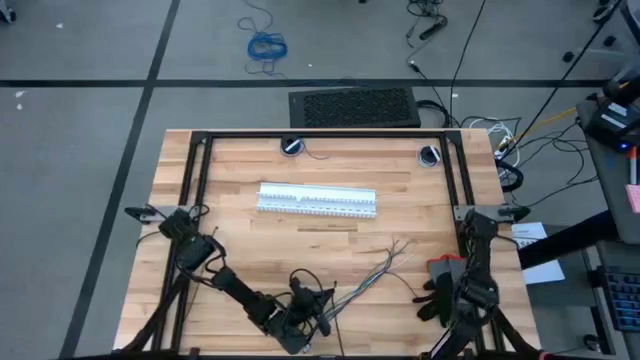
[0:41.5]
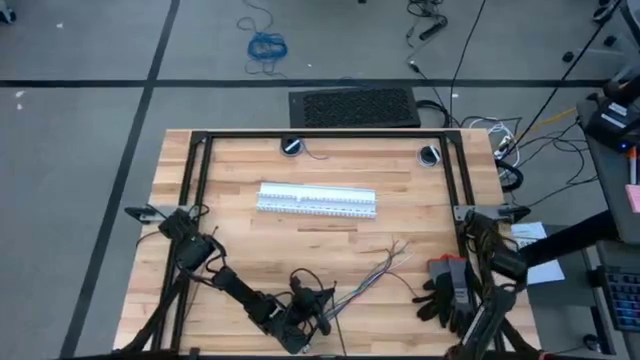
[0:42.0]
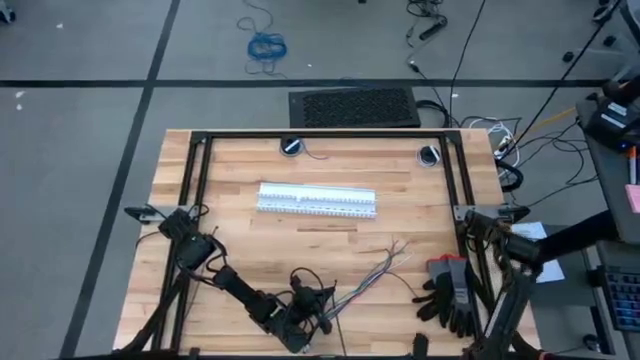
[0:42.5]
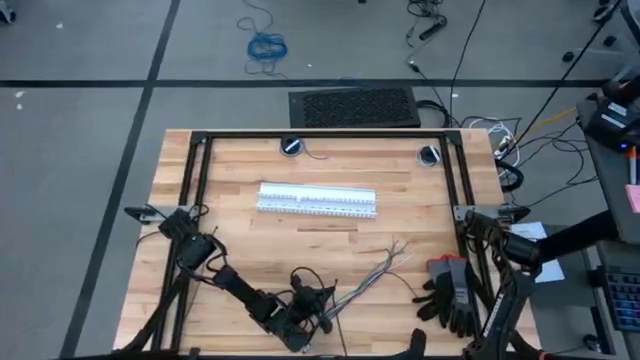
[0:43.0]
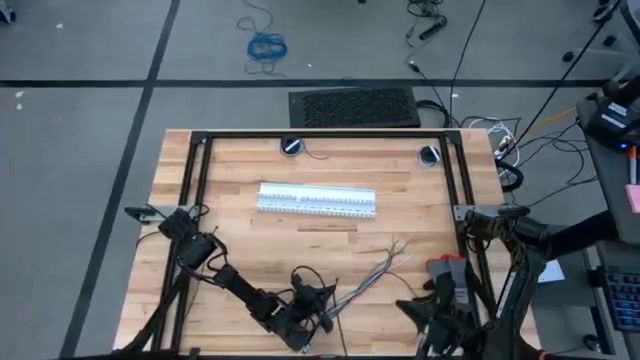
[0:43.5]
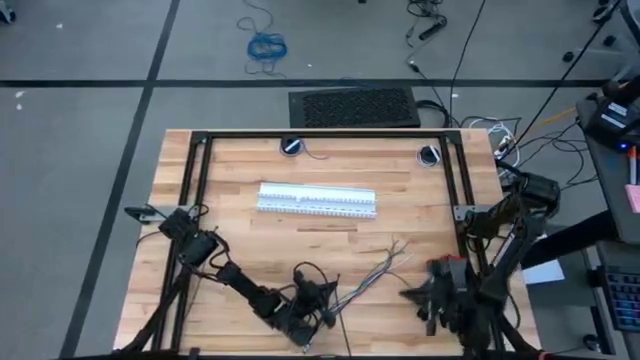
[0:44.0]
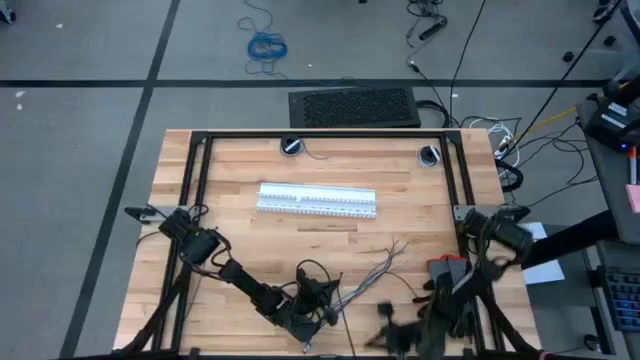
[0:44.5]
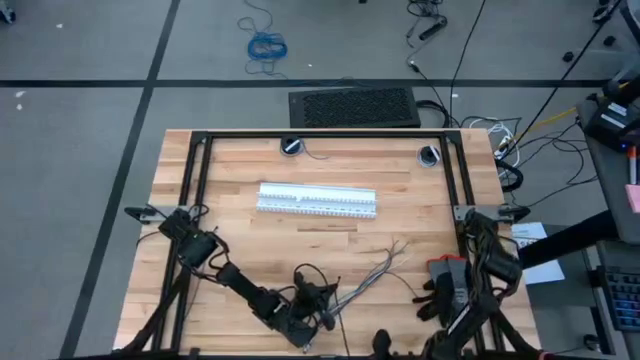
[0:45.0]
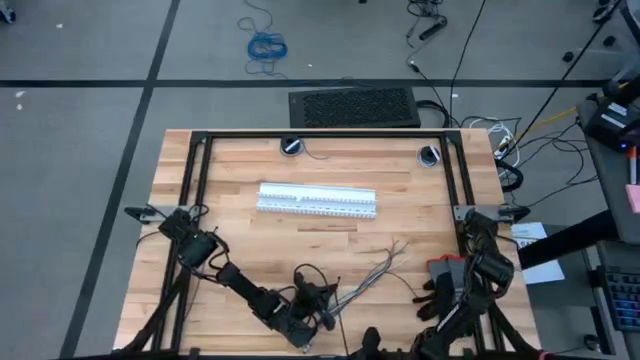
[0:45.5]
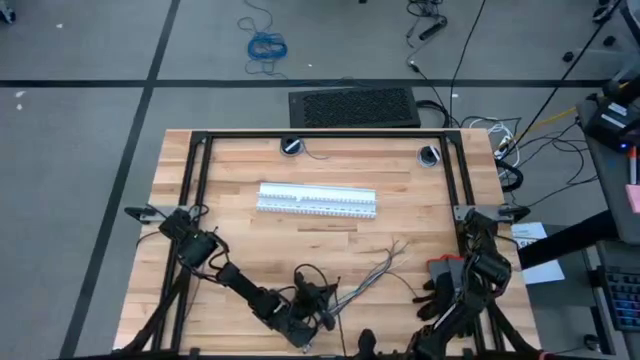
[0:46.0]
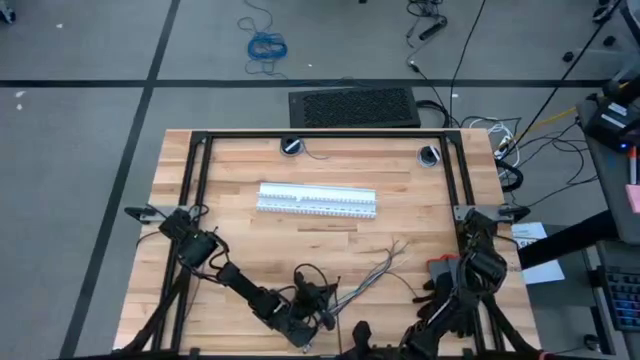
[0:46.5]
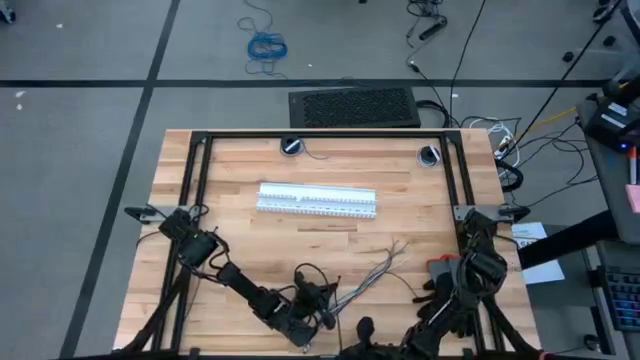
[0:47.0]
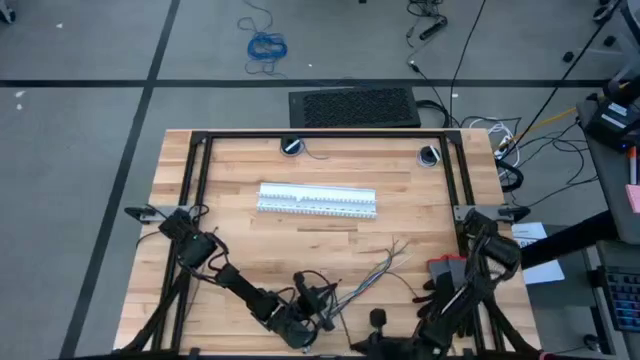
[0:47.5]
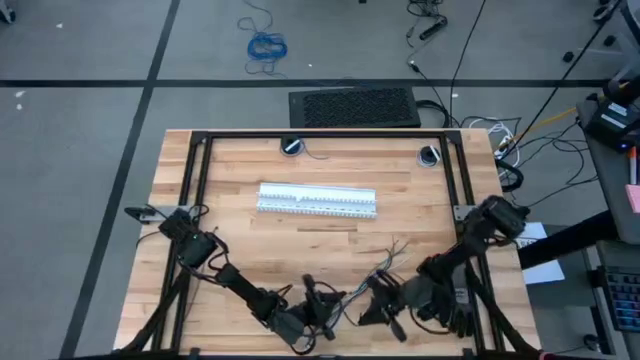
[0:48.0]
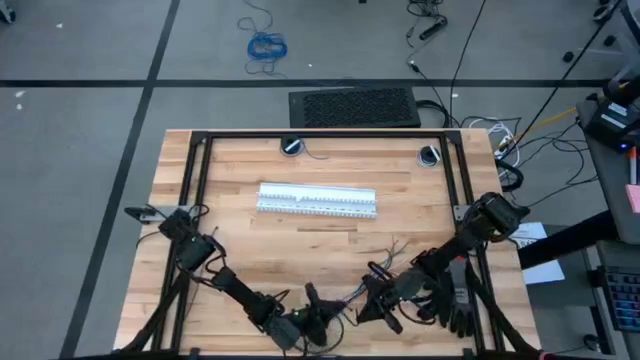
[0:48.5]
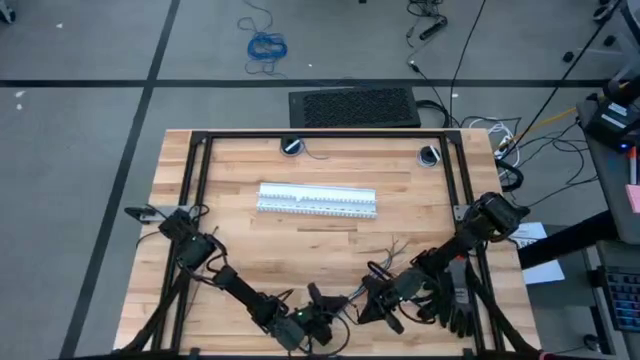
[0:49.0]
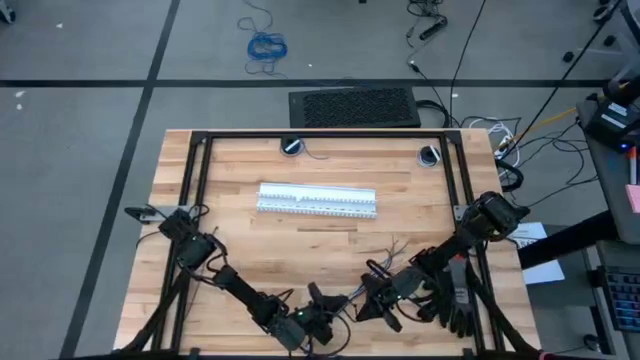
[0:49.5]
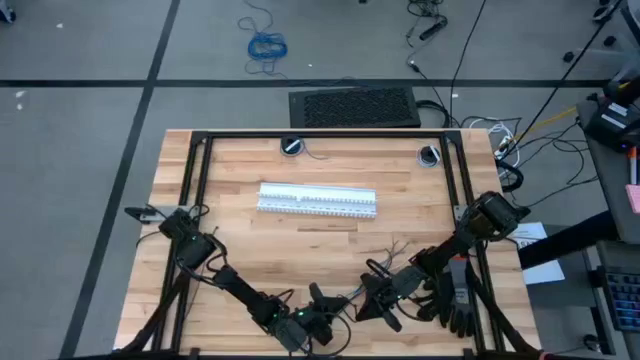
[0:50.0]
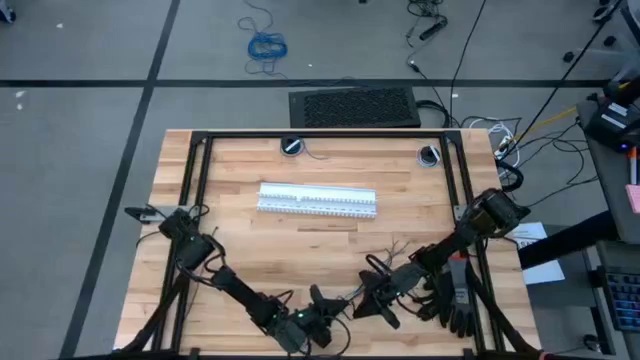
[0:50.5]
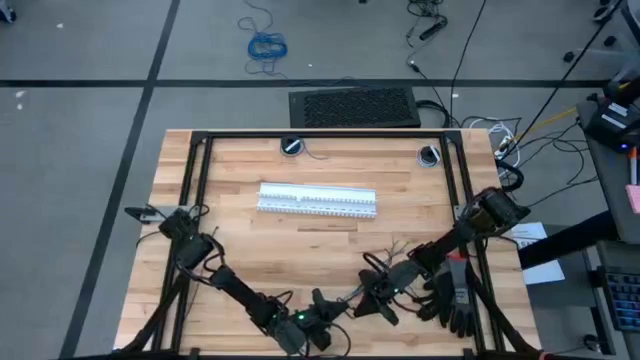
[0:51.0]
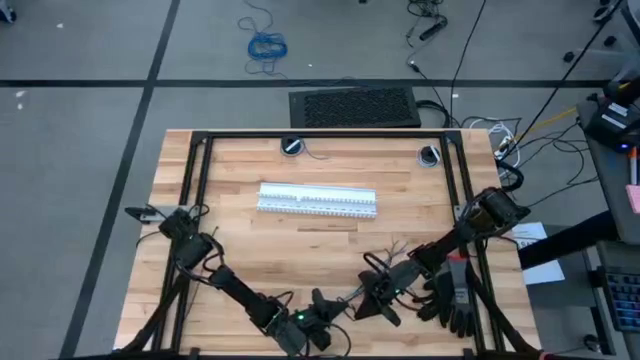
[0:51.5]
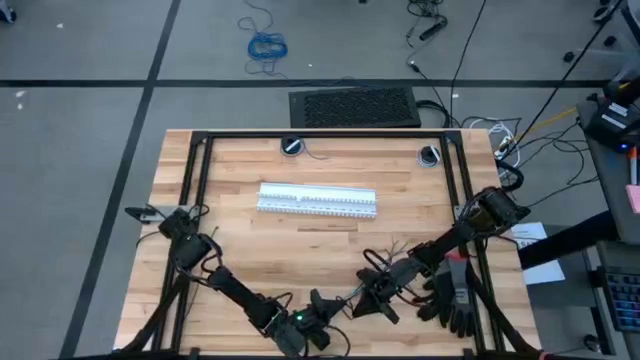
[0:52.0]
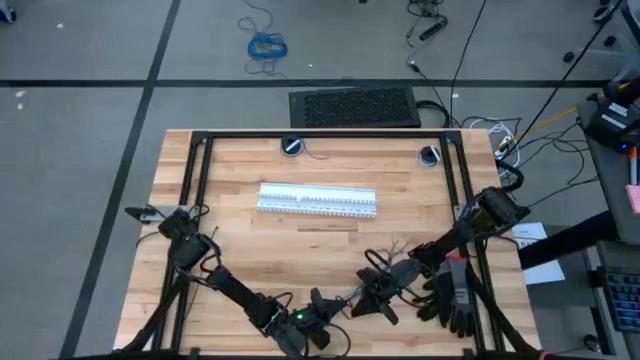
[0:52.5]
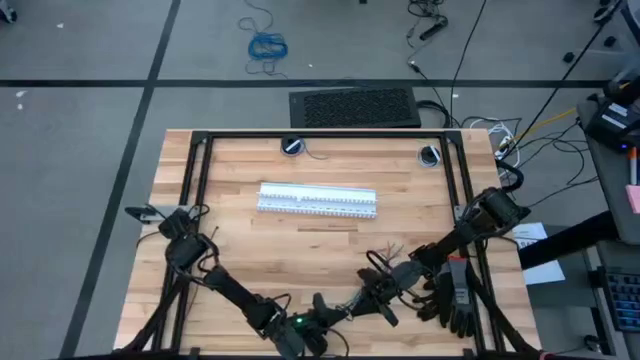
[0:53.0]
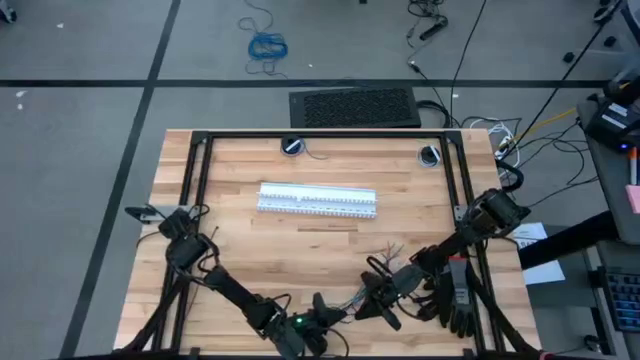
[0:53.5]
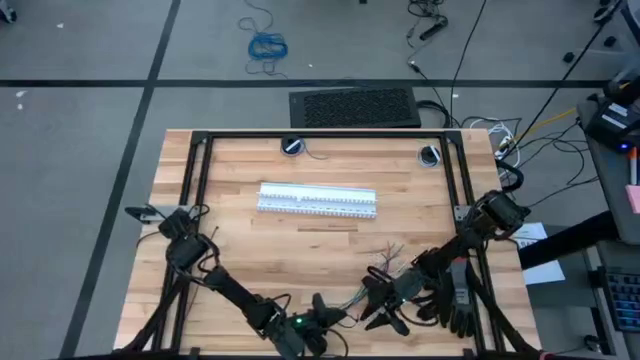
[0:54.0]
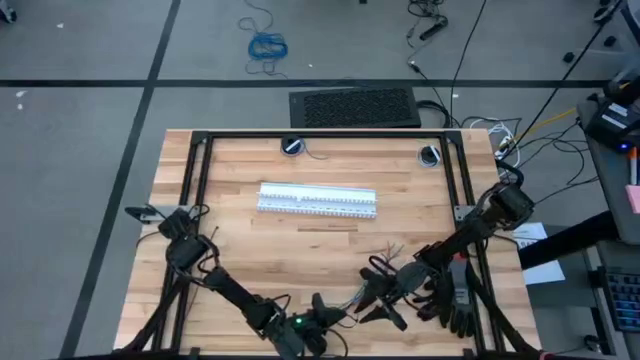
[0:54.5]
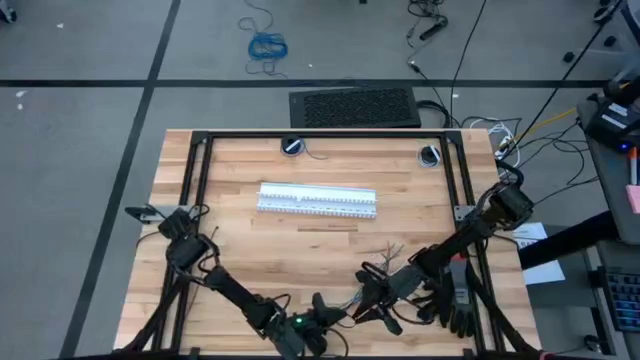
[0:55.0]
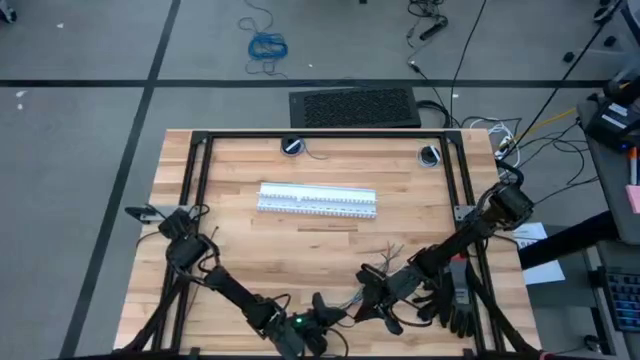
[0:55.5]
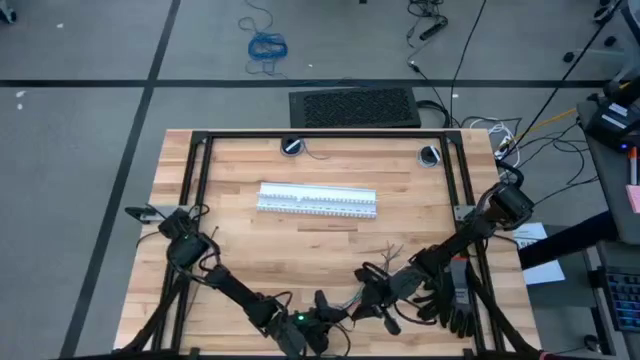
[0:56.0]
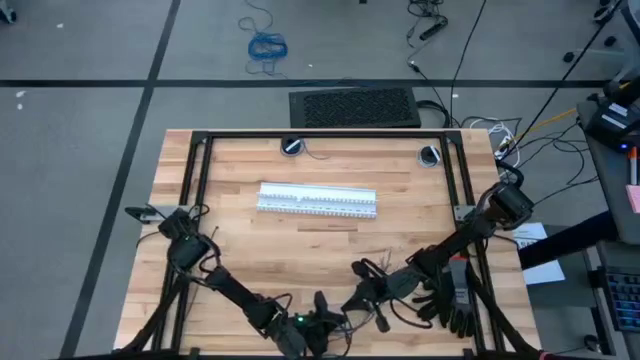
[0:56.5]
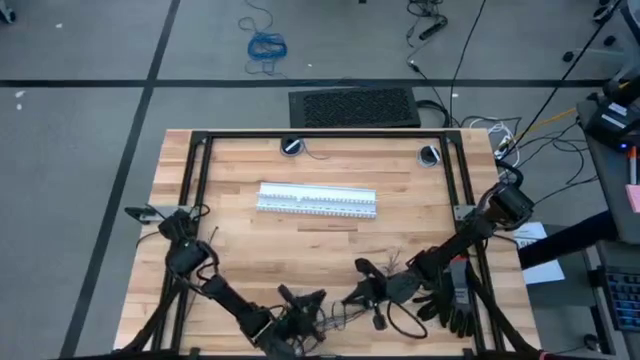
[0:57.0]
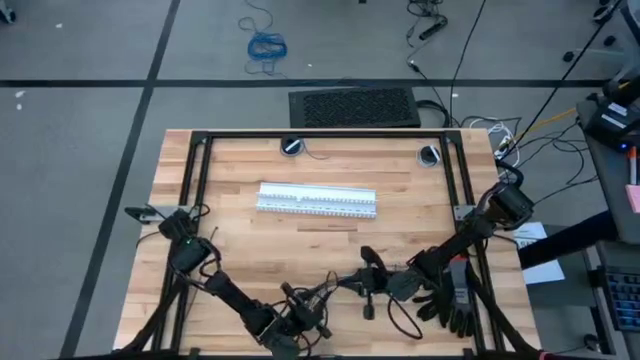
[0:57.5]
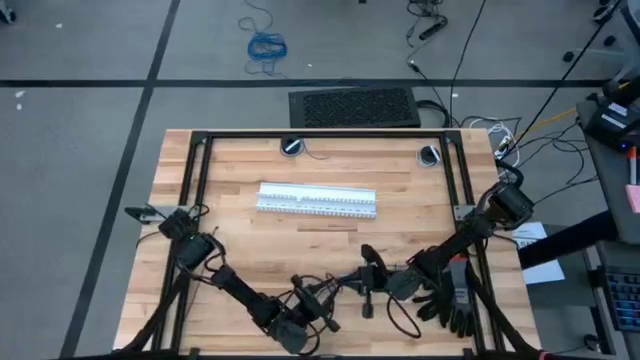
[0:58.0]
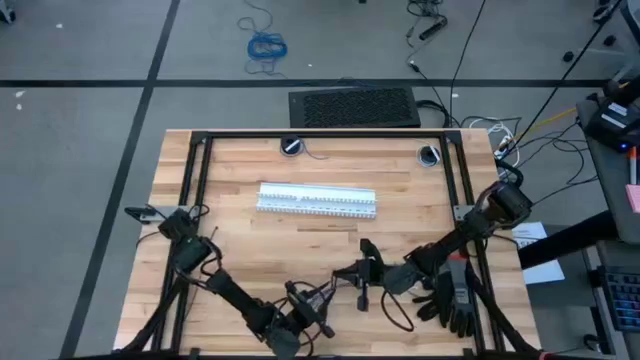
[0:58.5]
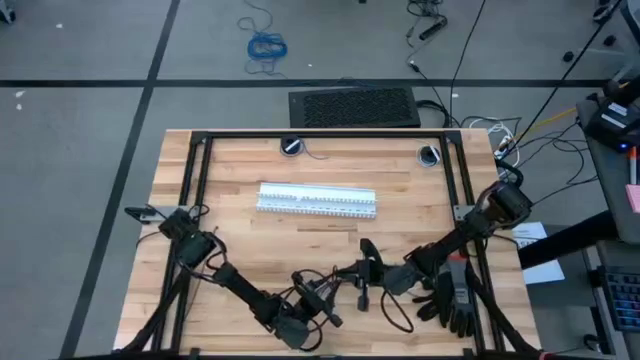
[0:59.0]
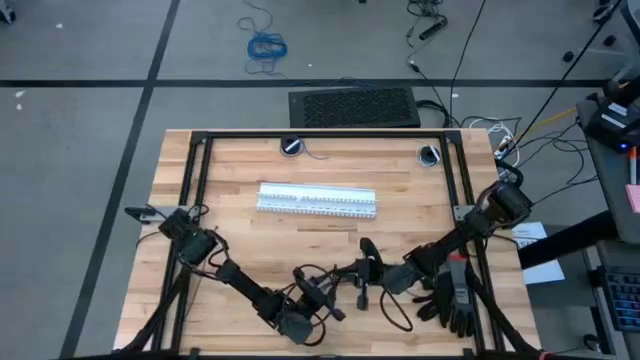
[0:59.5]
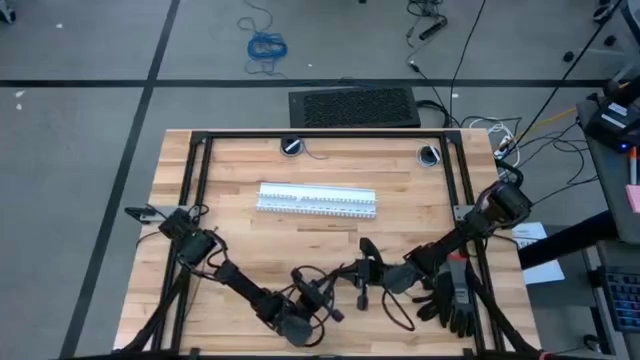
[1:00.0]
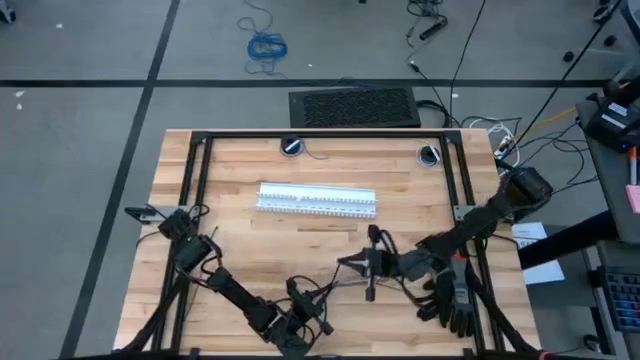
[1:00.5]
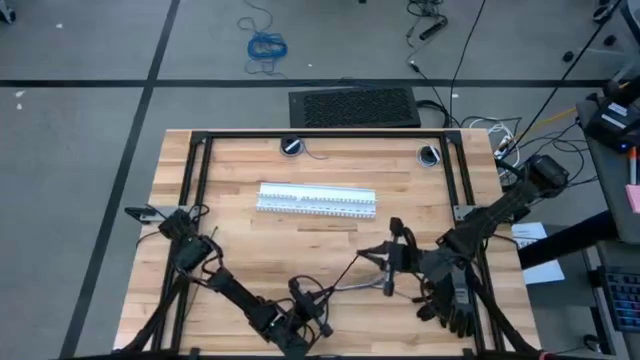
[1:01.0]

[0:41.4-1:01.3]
Task: Ziptie cables
Wrap the cables together using a zip tie

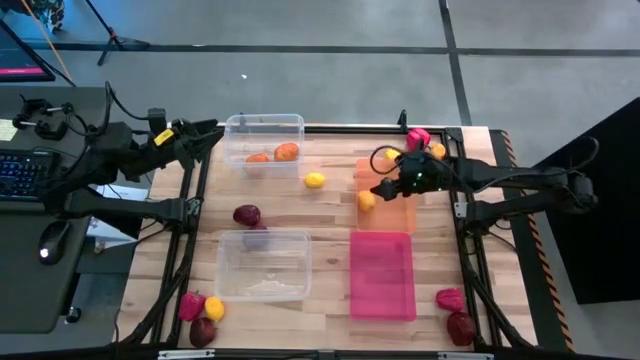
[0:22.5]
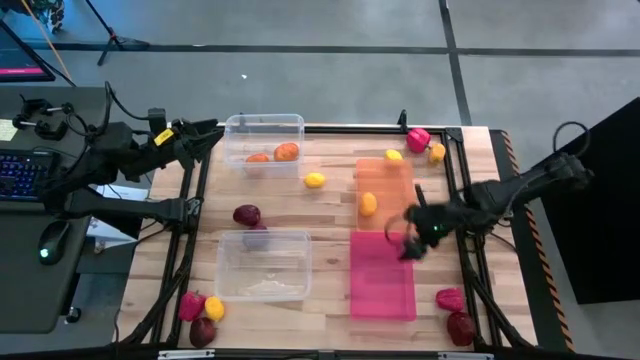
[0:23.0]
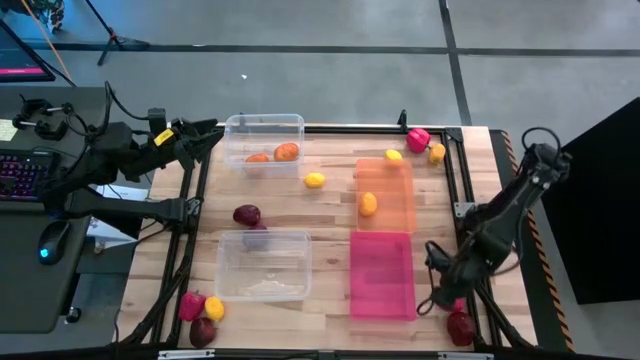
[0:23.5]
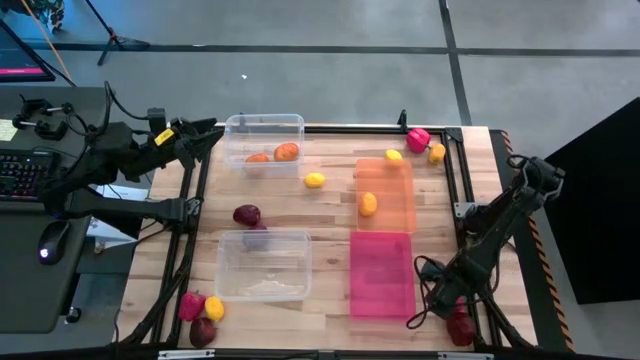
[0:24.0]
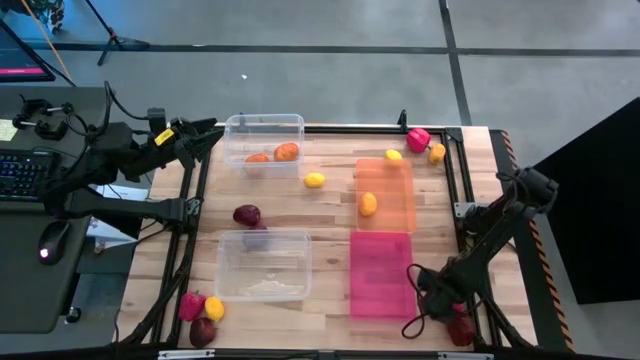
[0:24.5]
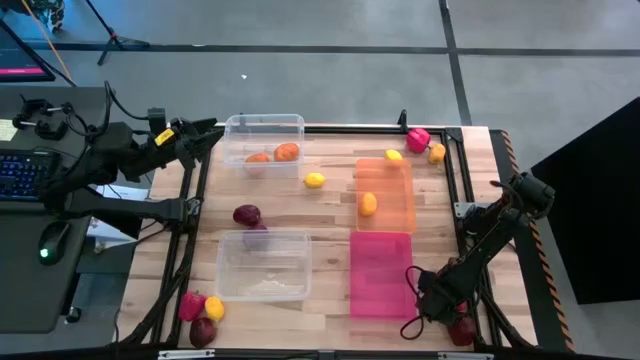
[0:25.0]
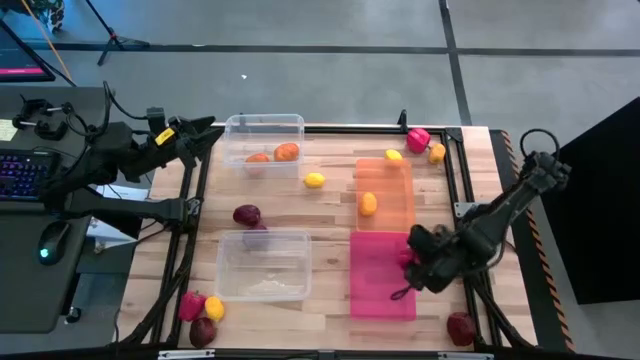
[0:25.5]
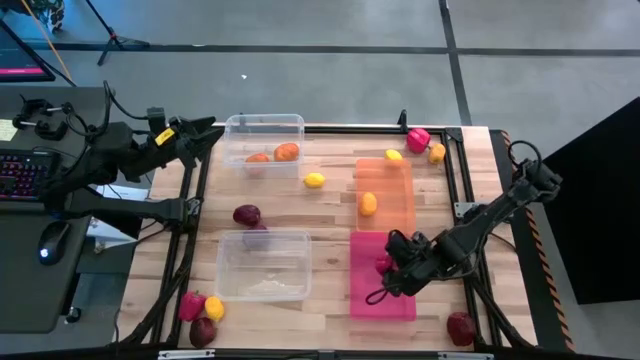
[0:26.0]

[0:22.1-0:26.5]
Task: Sort produce into baskets
Put the red bell pepper into the pink bin
